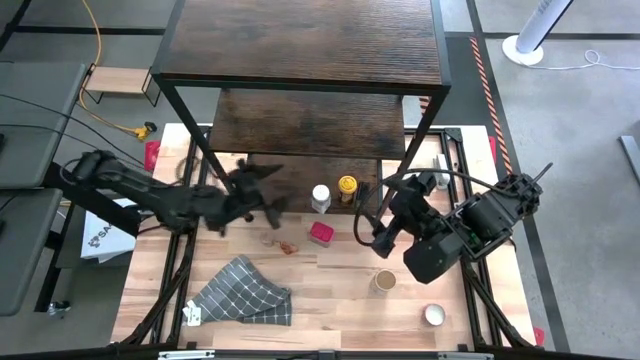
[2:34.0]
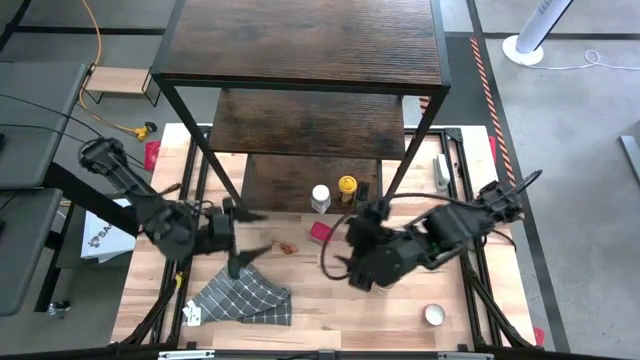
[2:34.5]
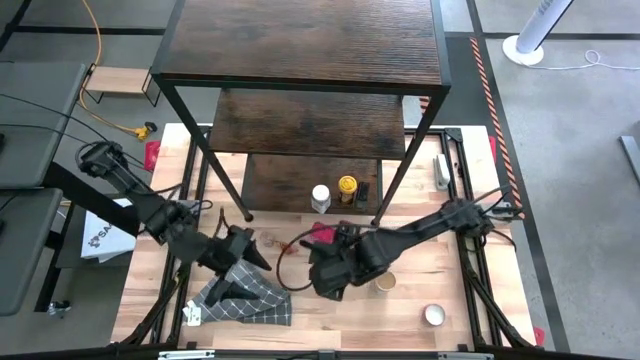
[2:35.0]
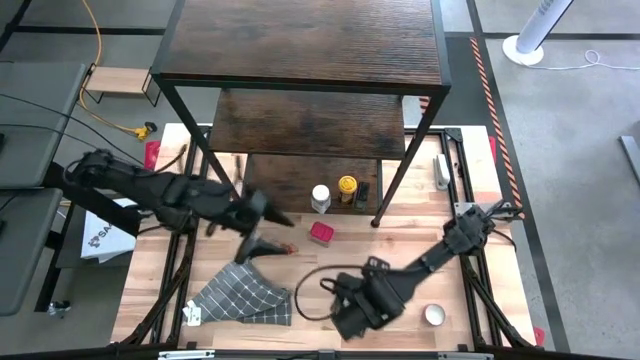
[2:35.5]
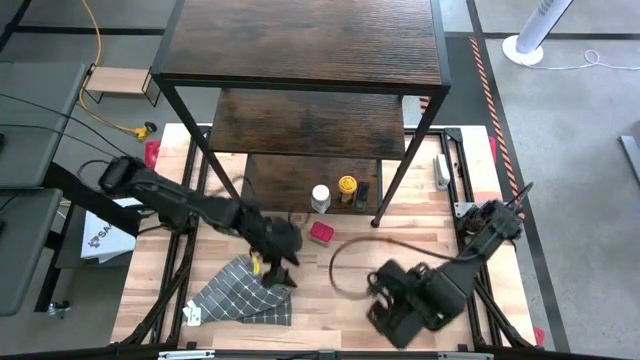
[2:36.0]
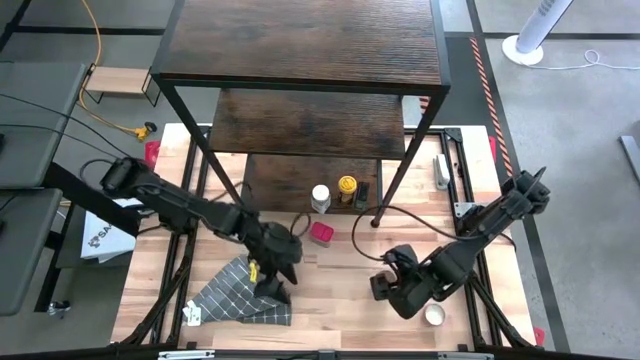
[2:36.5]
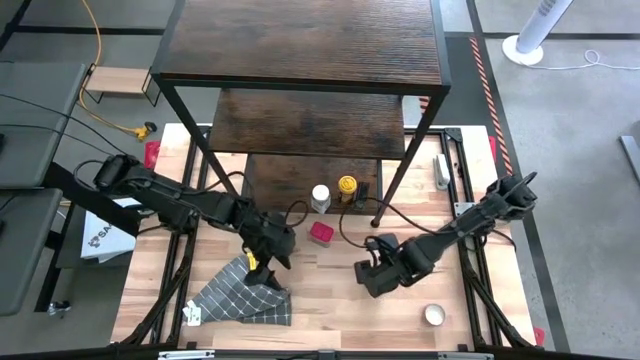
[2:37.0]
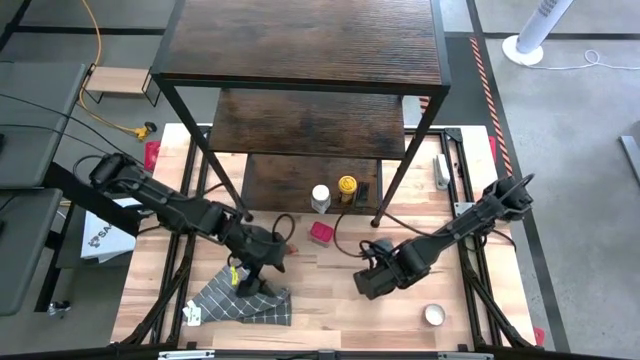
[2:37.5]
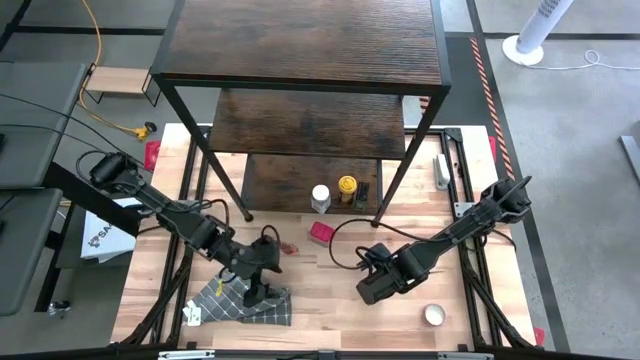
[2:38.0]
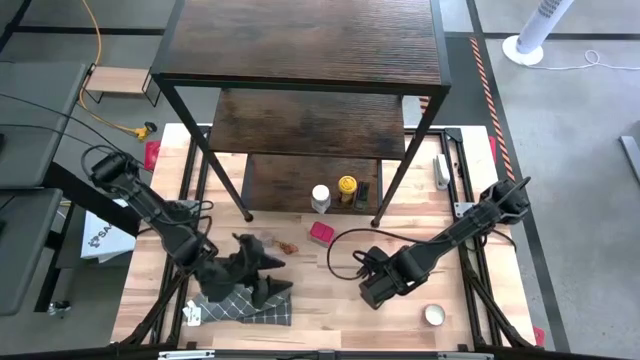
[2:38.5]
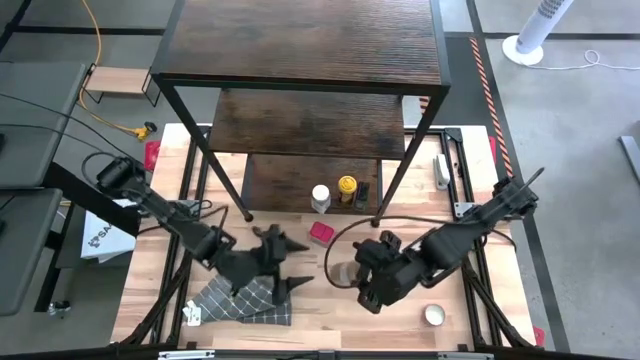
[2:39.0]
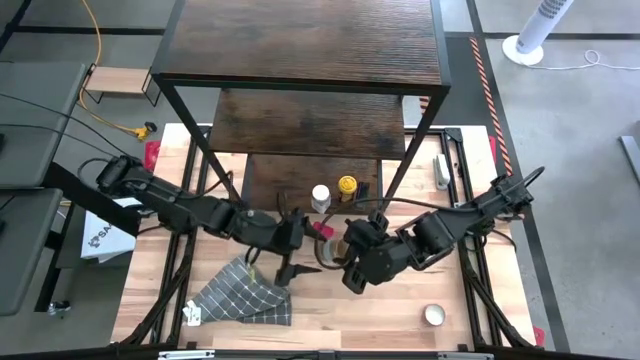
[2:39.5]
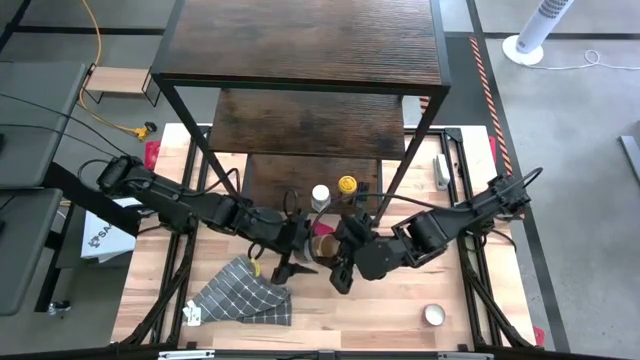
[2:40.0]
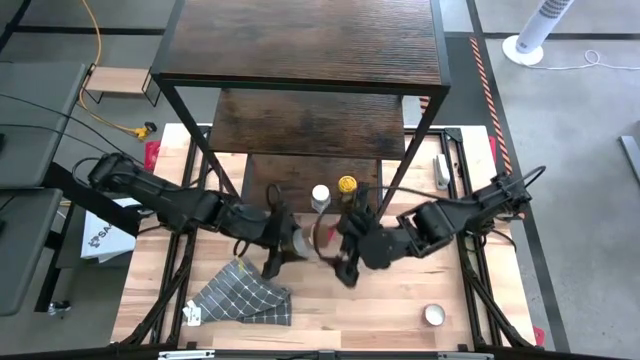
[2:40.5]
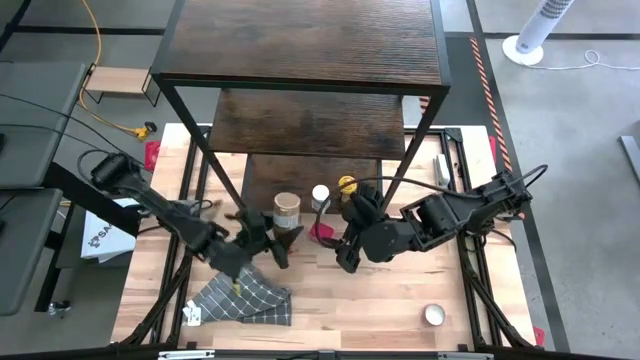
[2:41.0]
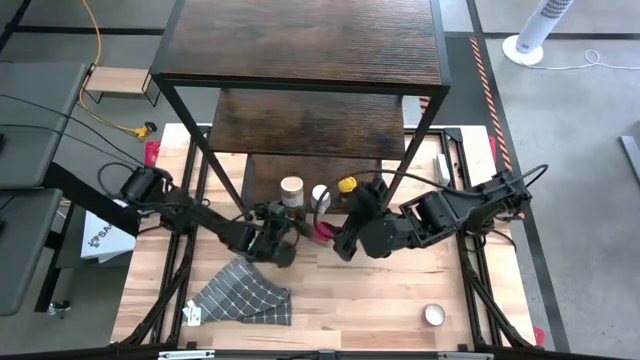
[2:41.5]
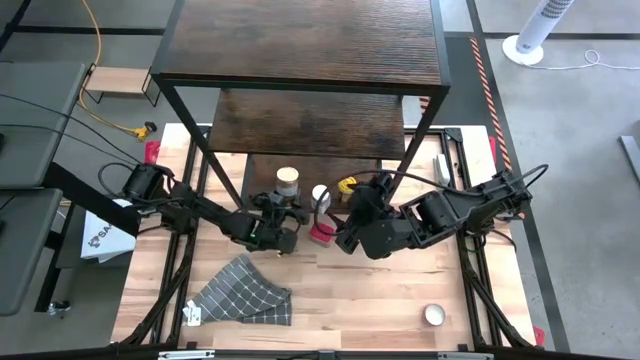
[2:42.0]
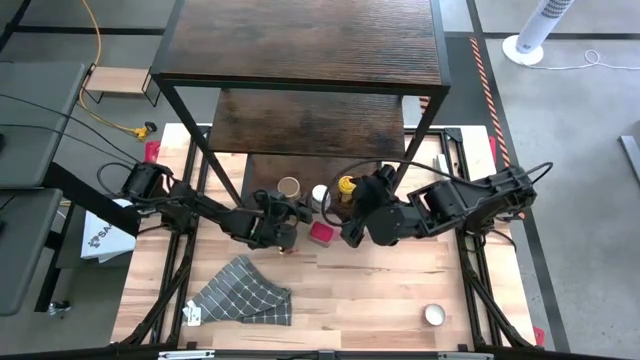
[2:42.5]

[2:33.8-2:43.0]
Task: Shelf spices
Put the gold seasoning bottle on the shelf

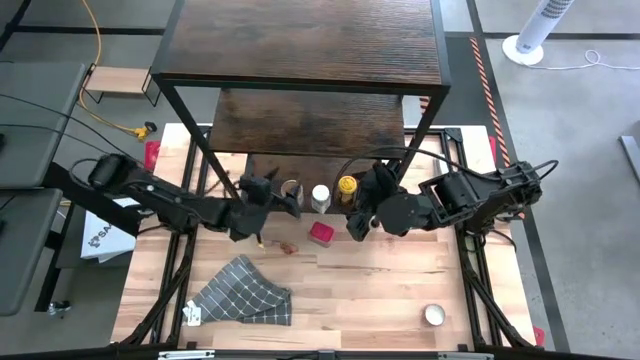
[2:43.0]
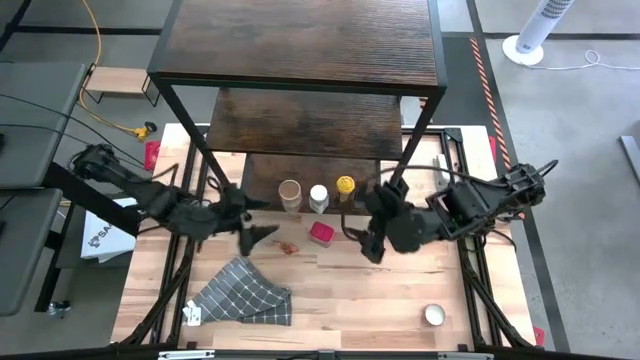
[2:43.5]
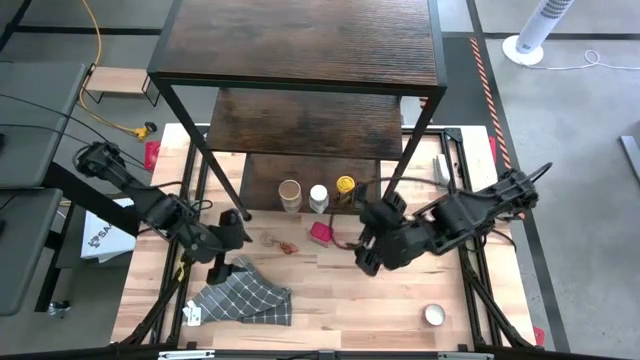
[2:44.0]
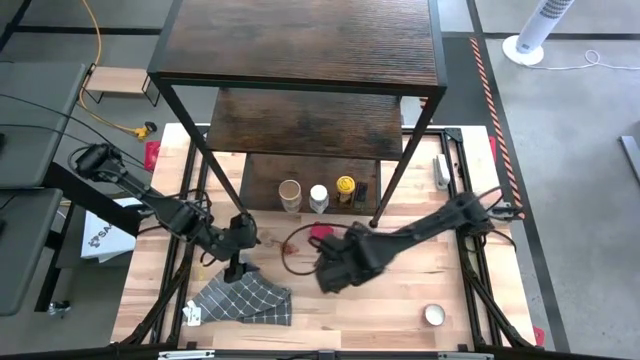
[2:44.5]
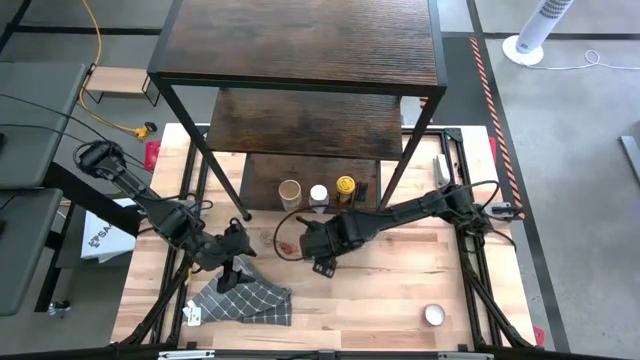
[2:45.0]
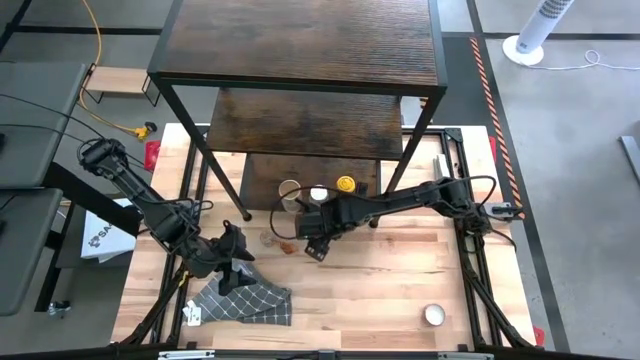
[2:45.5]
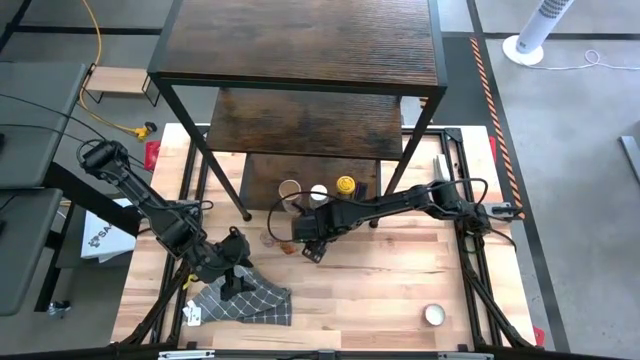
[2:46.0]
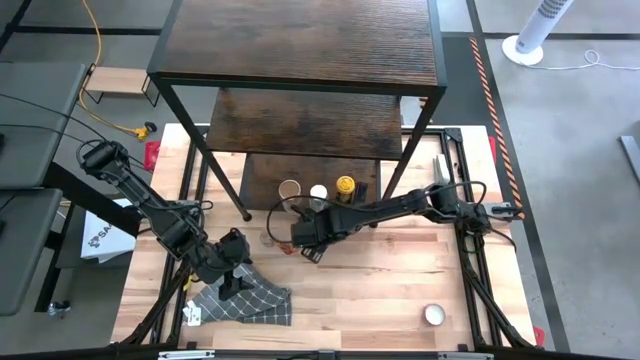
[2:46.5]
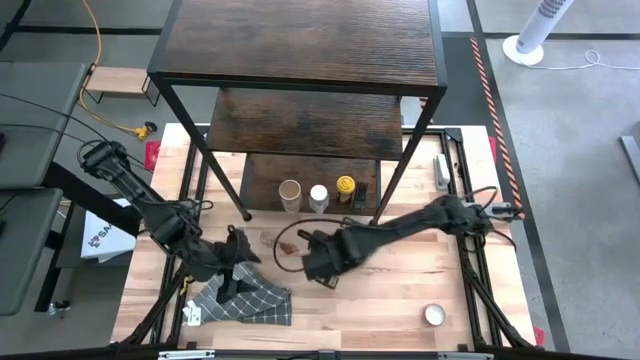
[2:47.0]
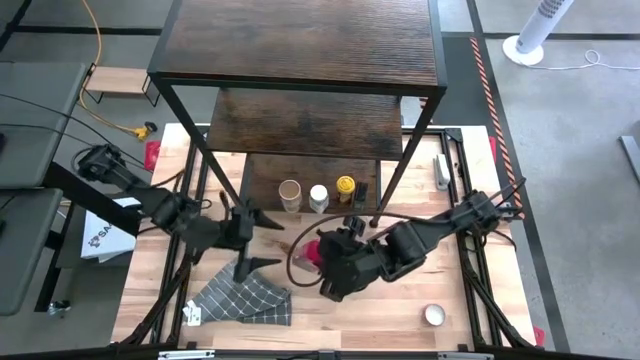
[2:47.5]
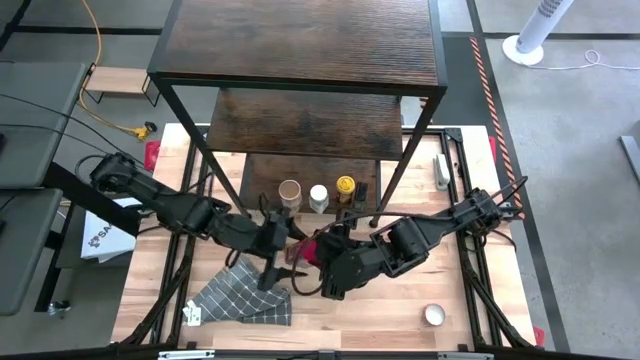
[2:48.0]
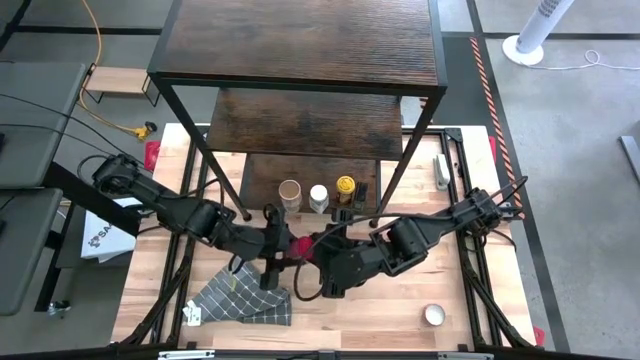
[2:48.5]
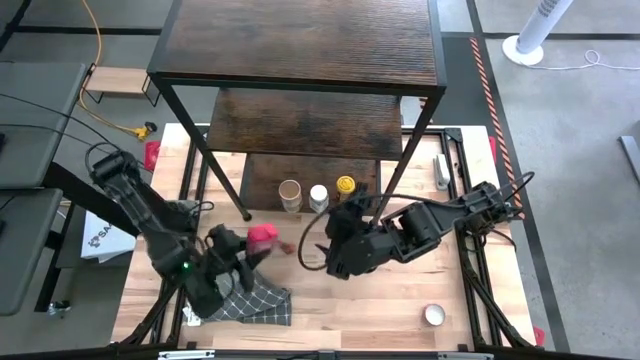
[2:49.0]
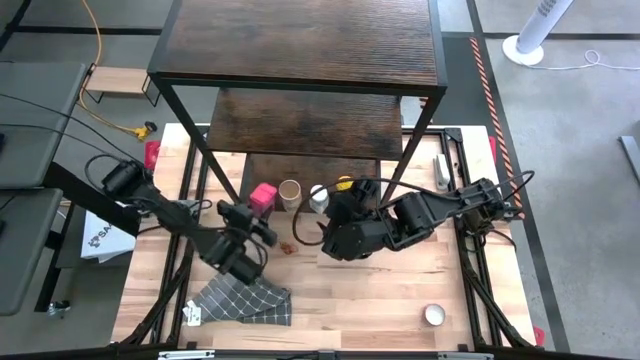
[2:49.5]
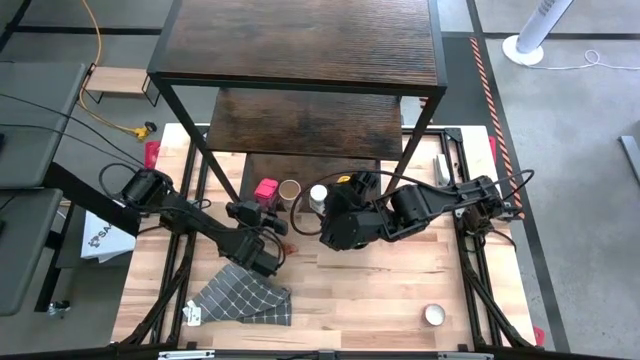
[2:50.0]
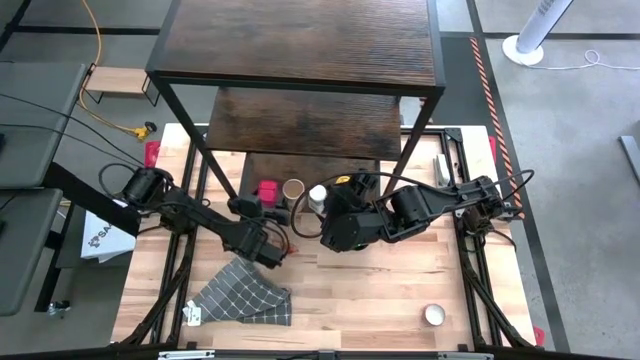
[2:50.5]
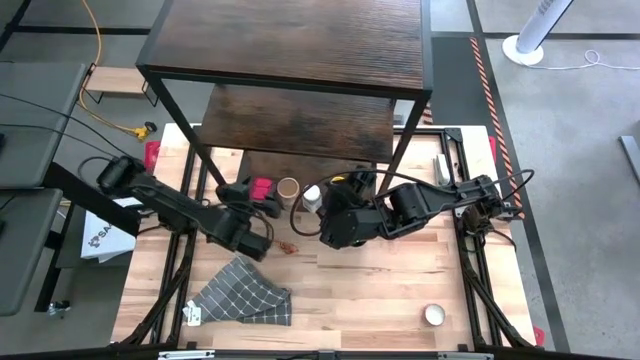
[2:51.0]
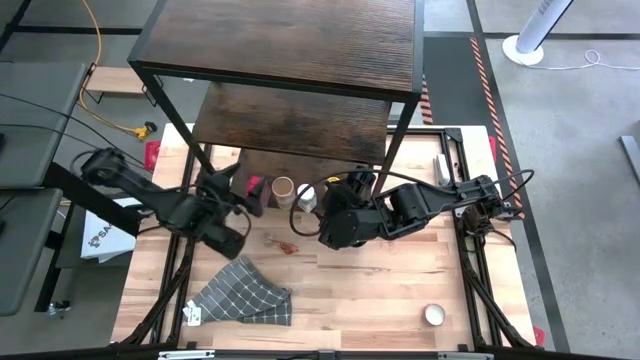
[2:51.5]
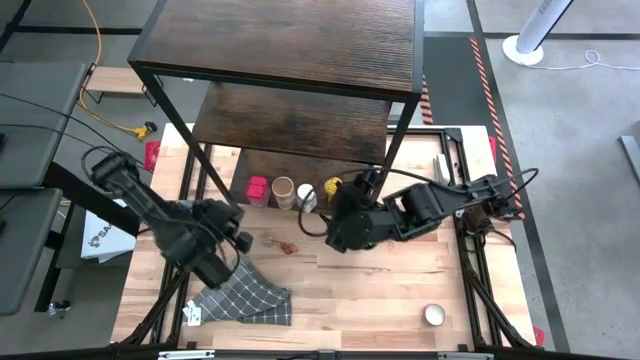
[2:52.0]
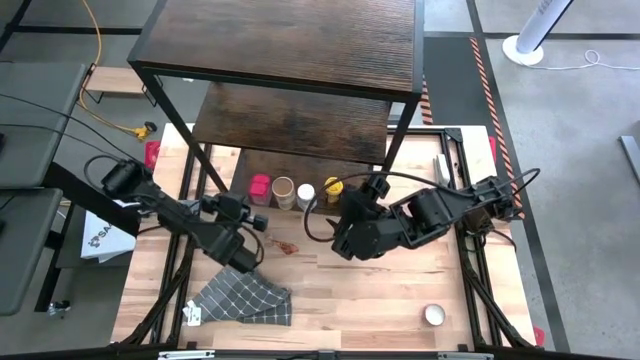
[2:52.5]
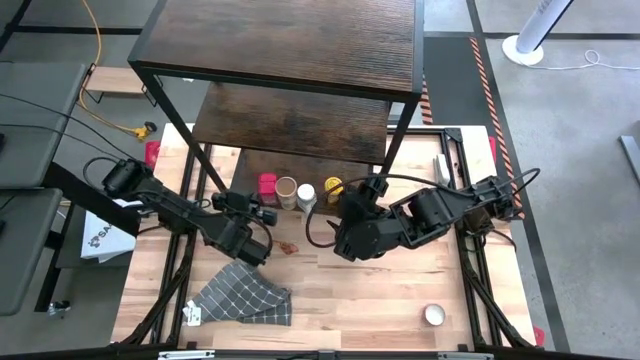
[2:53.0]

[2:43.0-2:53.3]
Put the red seasoning can on the shelf

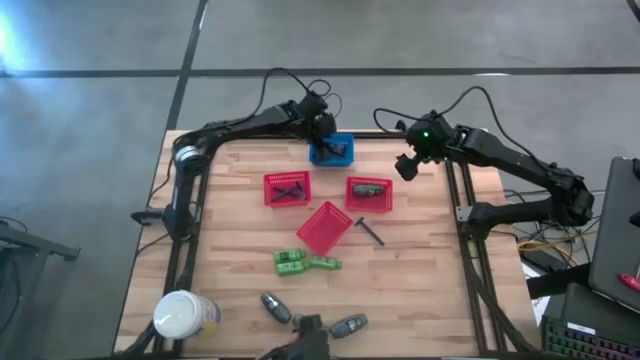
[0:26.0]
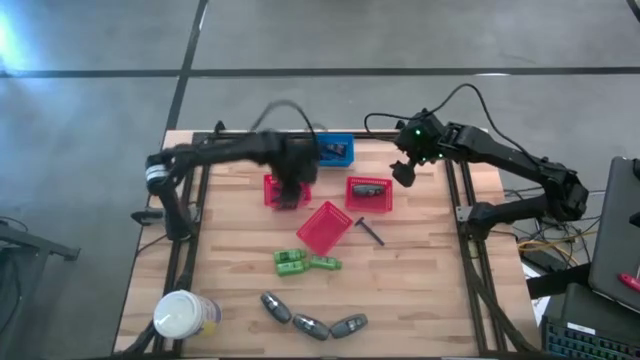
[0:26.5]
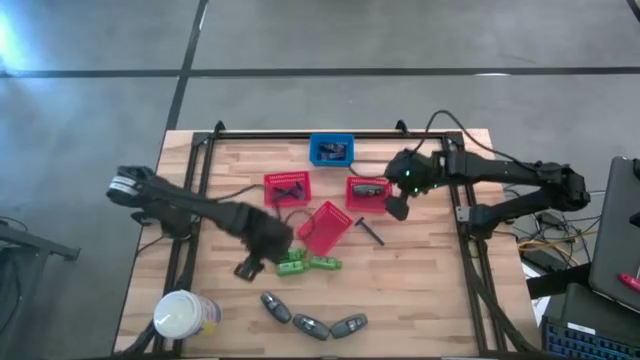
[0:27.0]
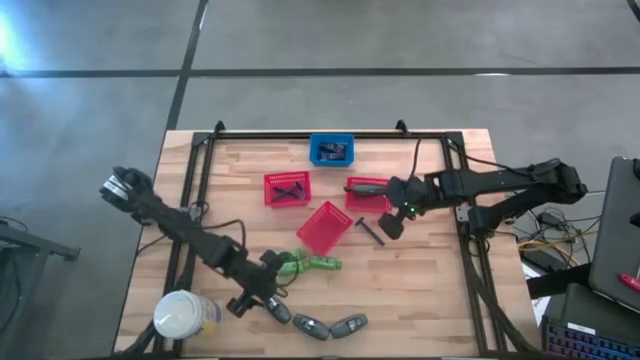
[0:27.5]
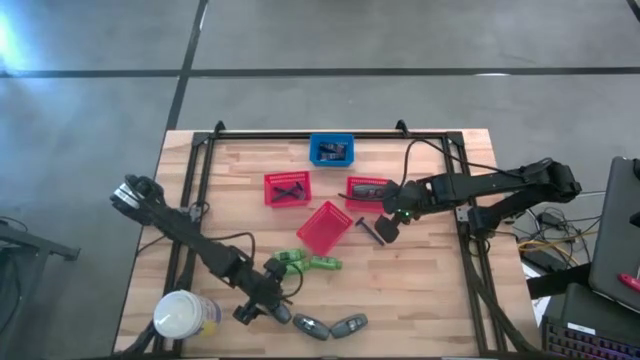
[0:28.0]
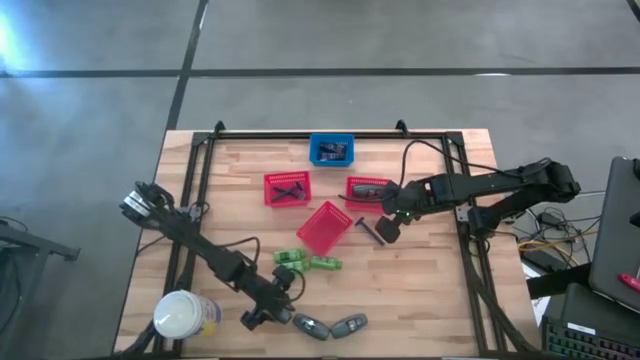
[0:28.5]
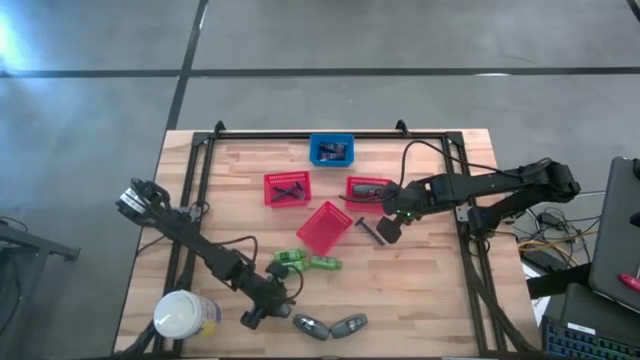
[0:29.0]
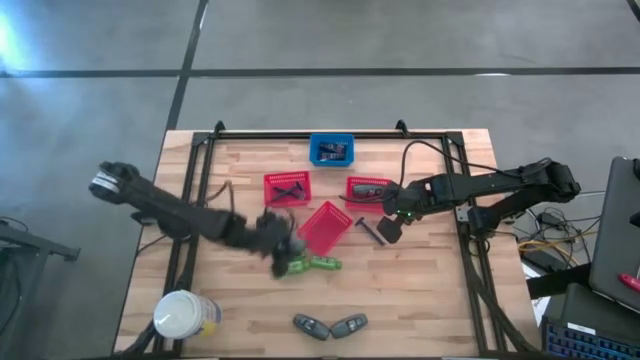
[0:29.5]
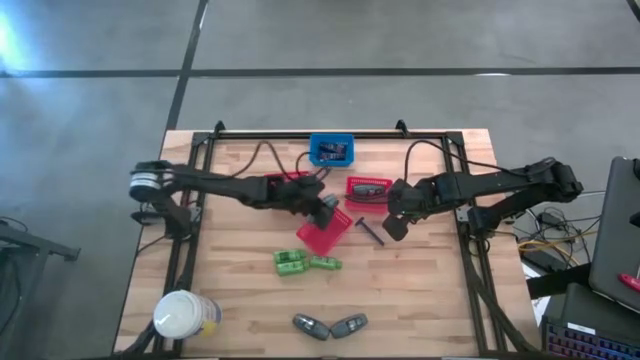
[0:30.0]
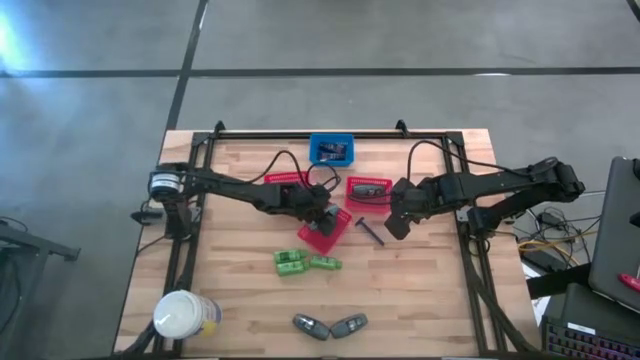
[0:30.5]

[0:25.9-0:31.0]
Task: Pick & Place Travel size toiletries
Put the black deodorant into the top right red bin
